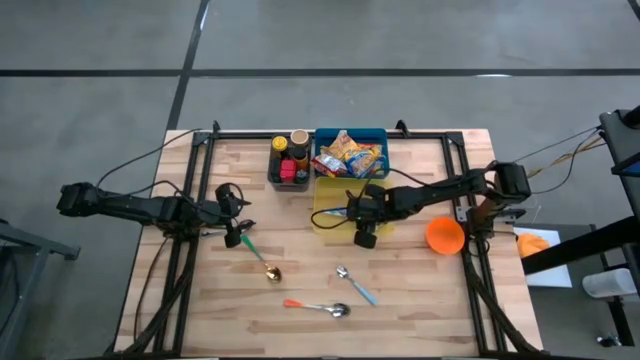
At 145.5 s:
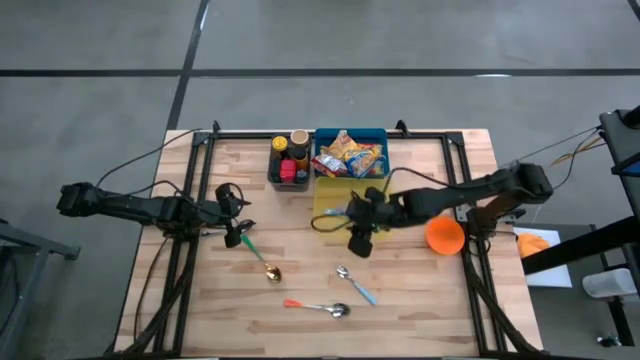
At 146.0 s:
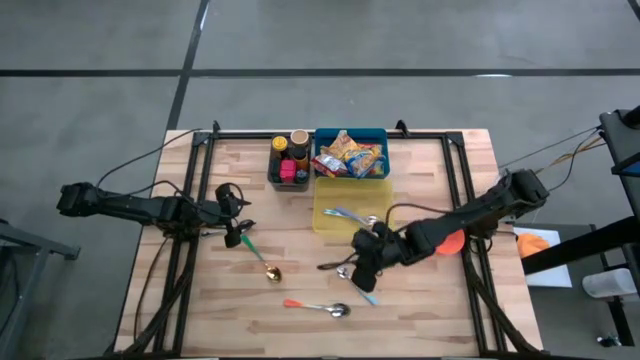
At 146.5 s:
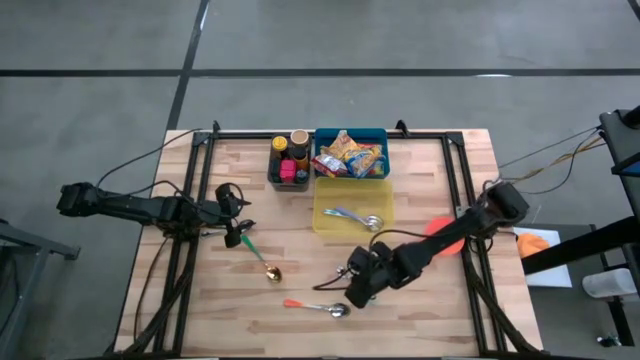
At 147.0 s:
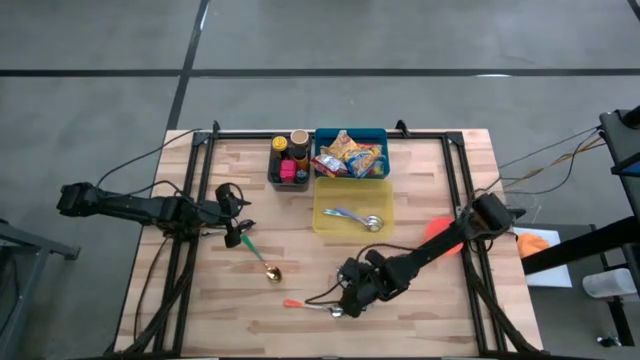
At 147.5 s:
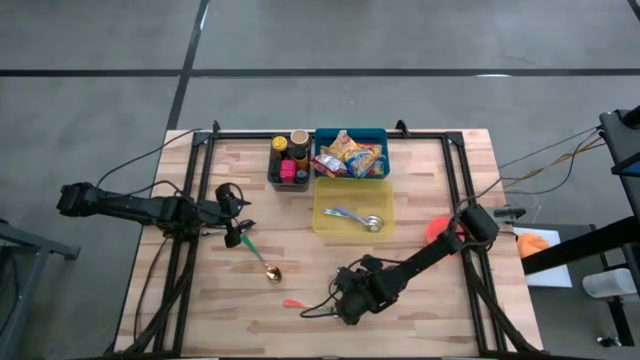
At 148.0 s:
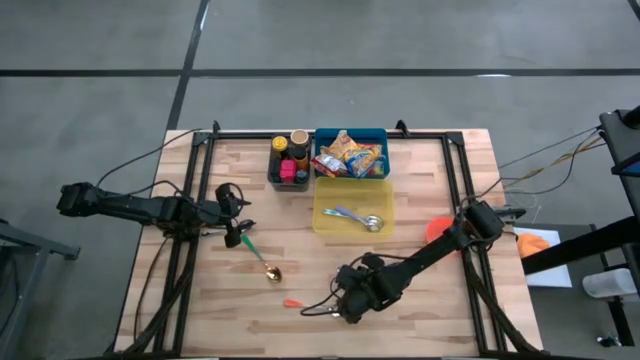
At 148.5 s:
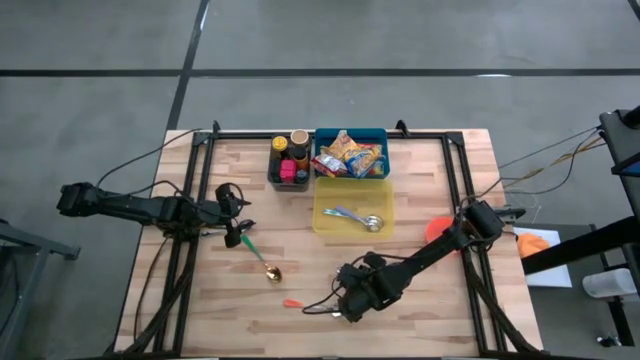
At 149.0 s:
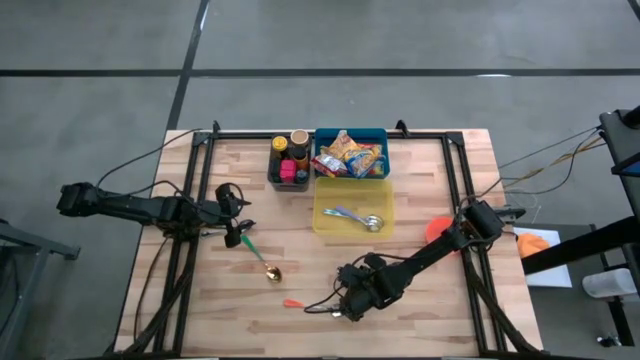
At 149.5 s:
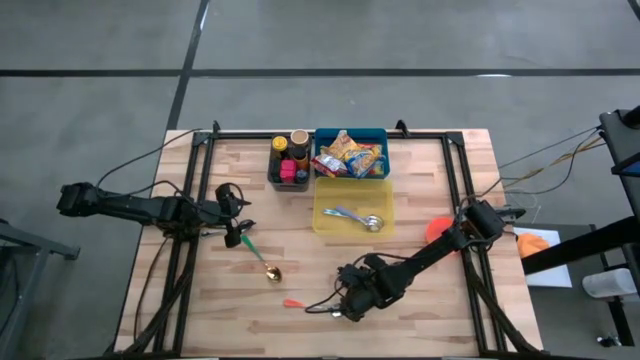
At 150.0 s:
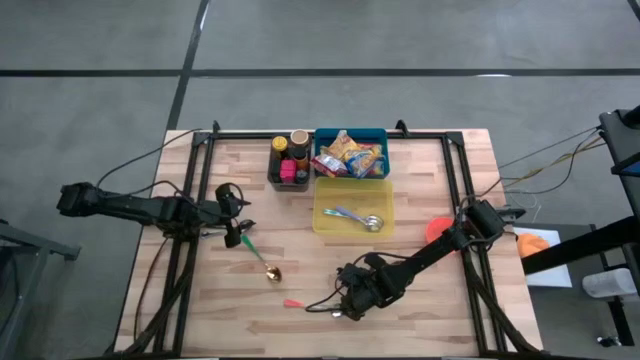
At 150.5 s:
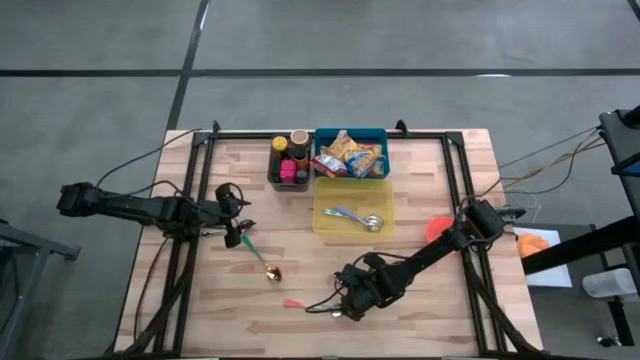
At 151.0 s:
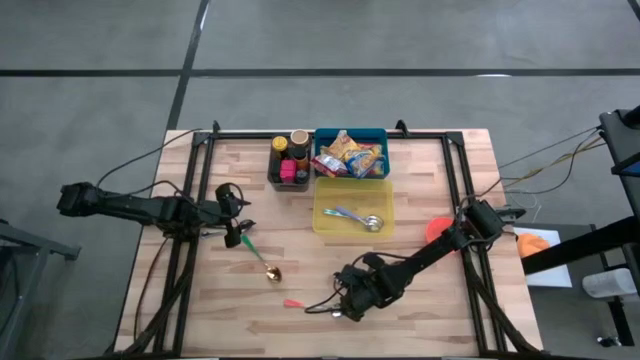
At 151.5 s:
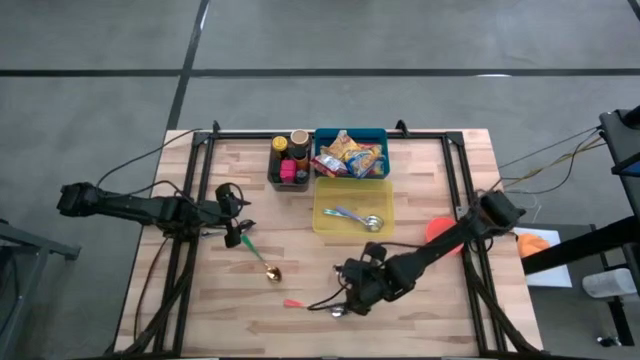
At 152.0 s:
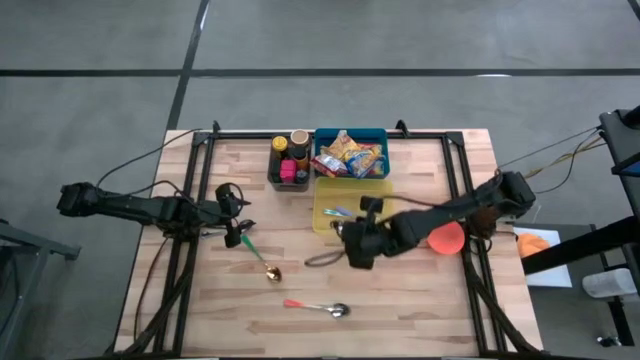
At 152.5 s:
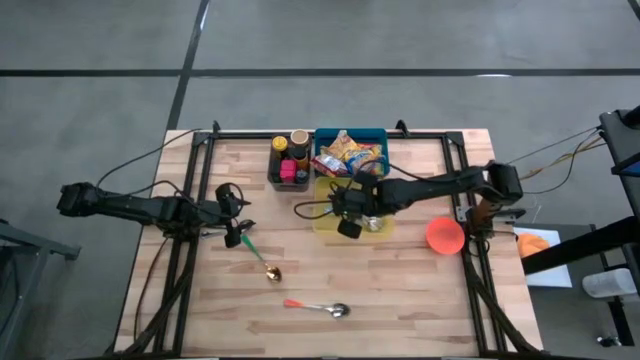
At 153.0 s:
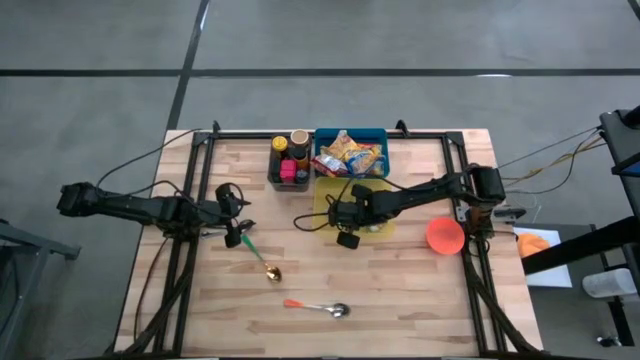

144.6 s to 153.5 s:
Put the light blue spoon into the yellow bin

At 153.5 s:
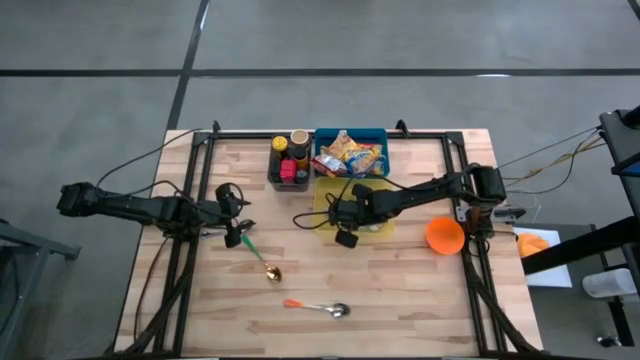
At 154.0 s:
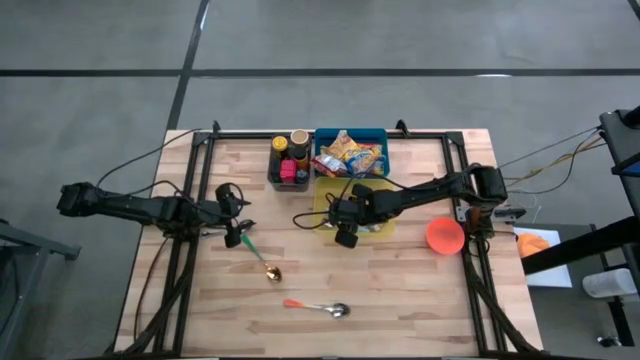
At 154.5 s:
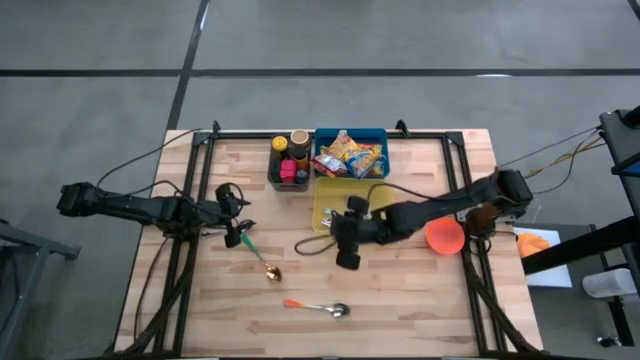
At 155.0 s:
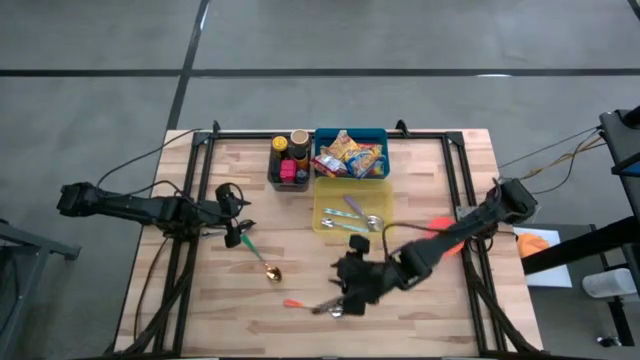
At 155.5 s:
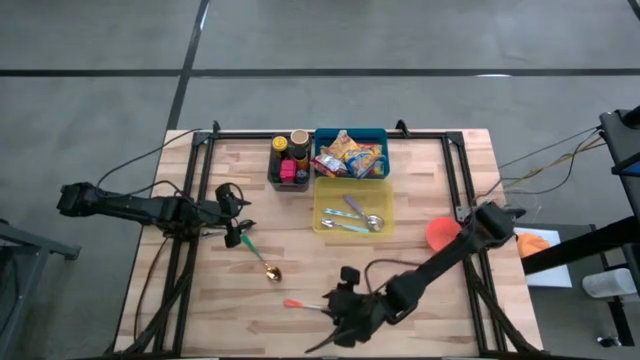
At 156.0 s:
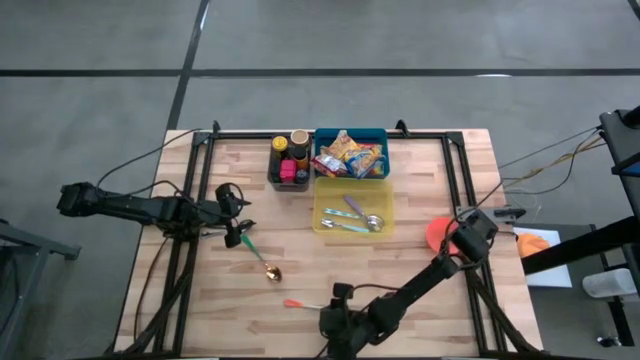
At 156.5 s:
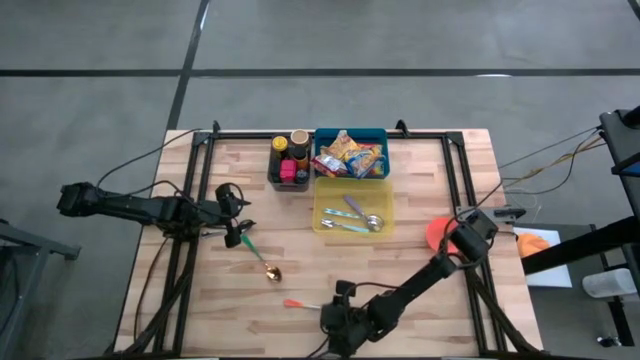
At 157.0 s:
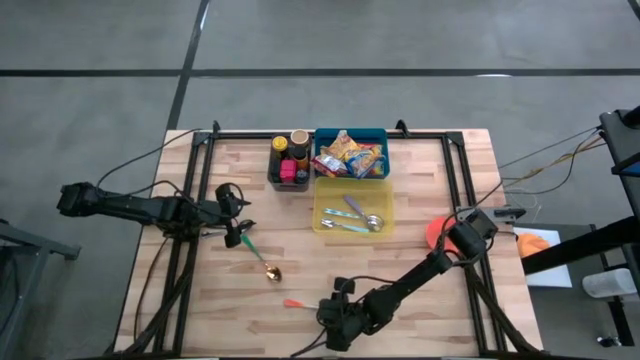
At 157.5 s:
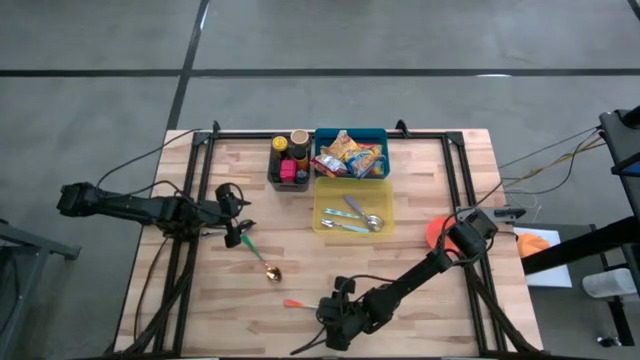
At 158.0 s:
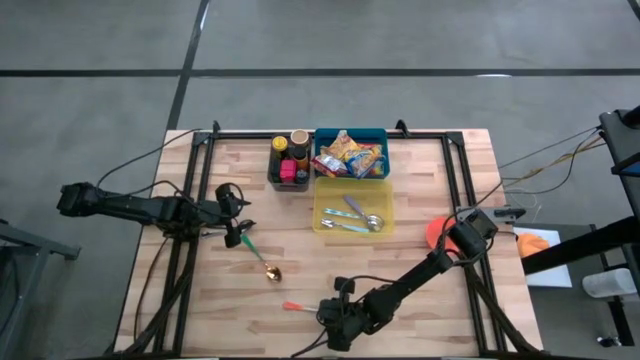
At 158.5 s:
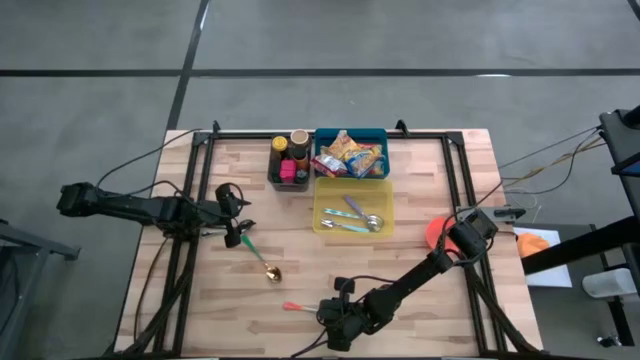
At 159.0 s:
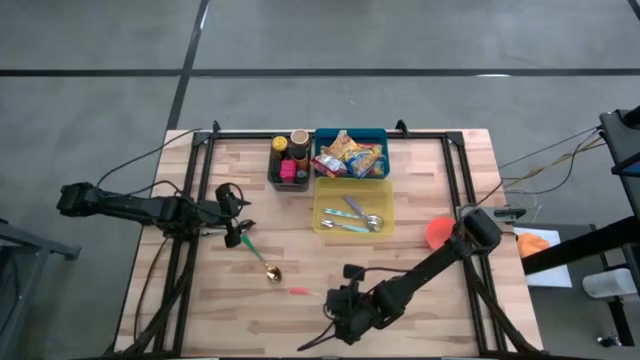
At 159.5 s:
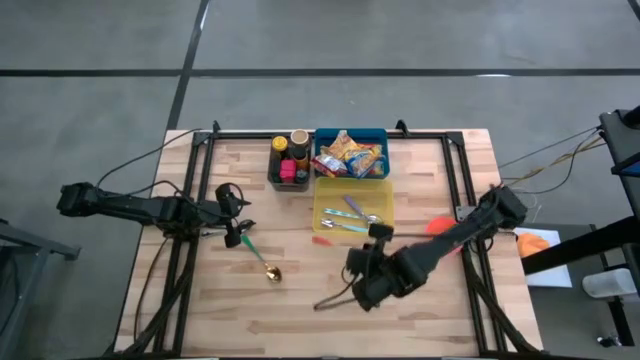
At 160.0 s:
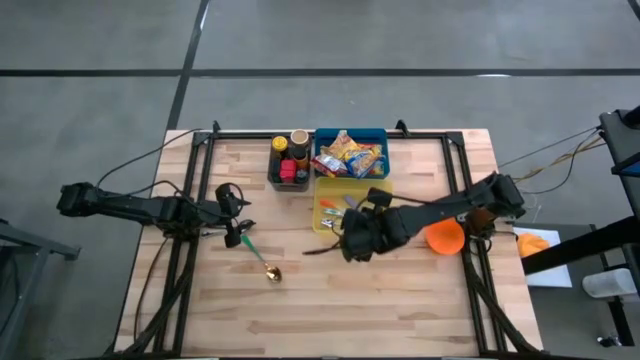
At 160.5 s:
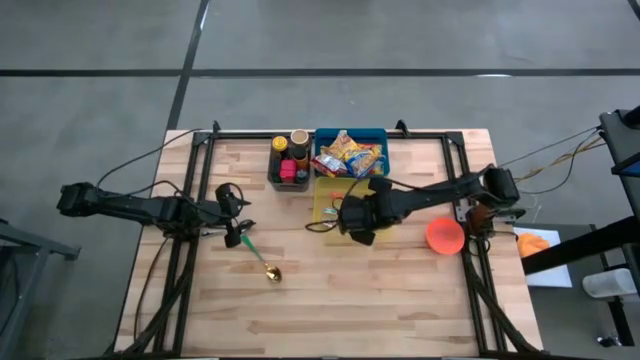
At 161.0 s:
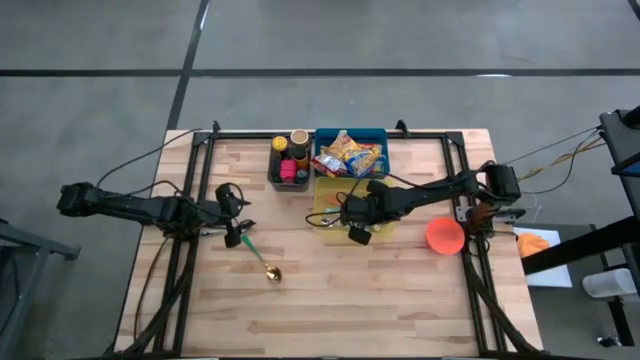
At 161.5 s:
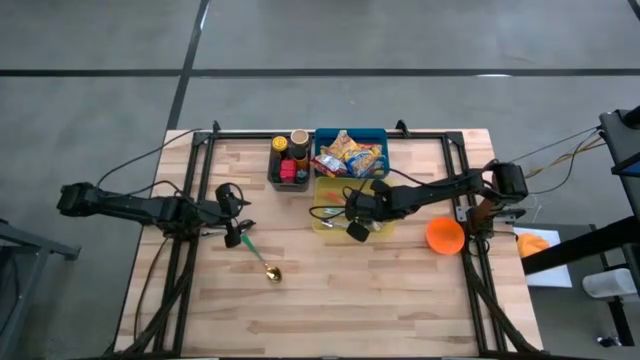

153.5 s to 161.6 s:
Put the orange spoon into the yellow bin
